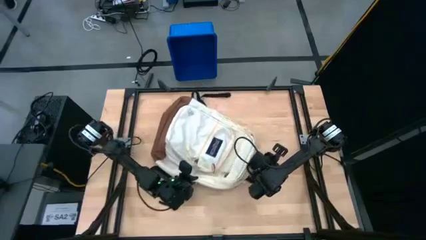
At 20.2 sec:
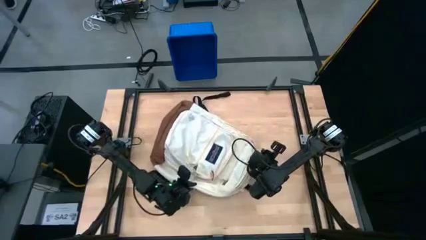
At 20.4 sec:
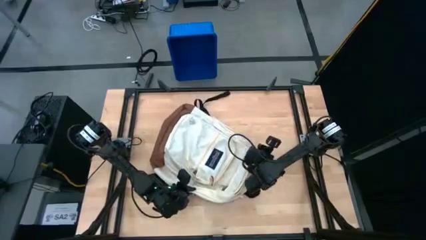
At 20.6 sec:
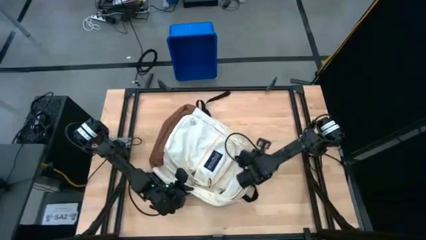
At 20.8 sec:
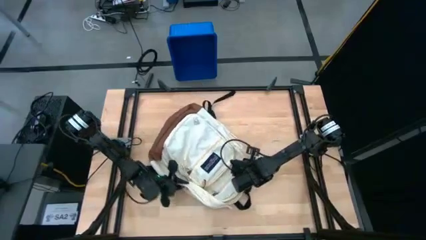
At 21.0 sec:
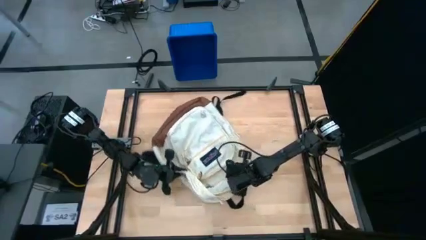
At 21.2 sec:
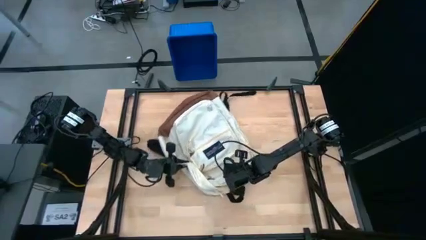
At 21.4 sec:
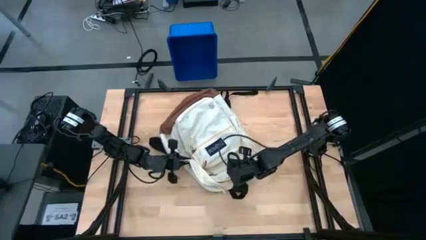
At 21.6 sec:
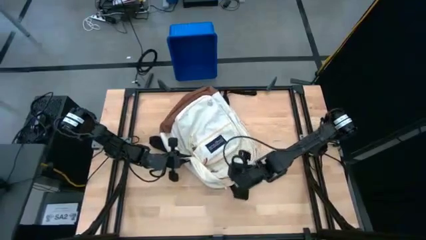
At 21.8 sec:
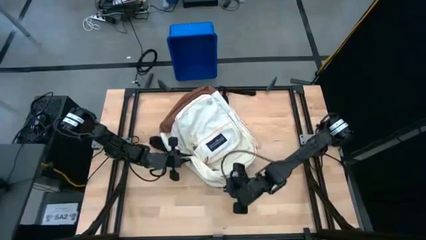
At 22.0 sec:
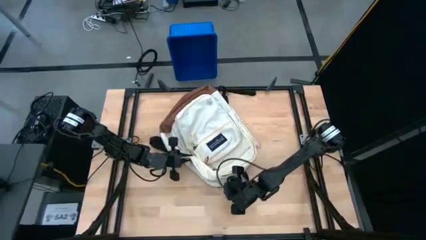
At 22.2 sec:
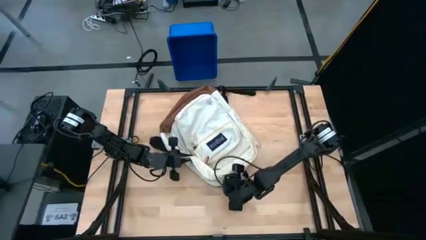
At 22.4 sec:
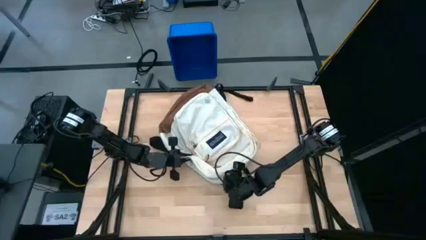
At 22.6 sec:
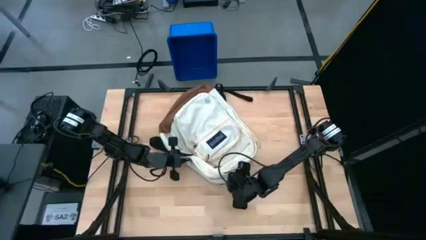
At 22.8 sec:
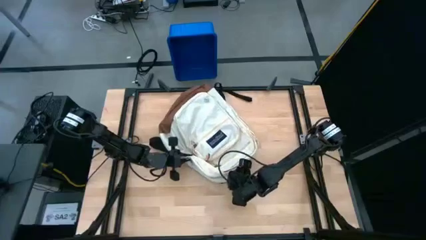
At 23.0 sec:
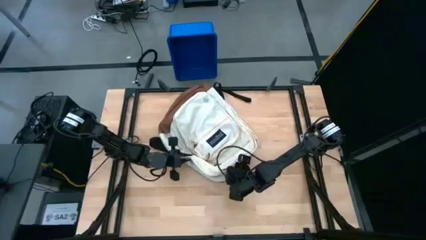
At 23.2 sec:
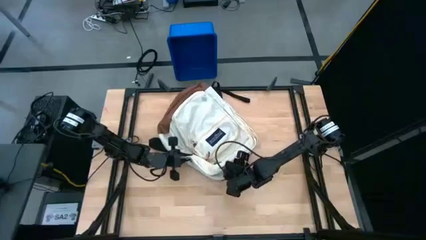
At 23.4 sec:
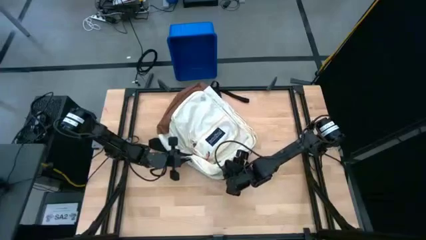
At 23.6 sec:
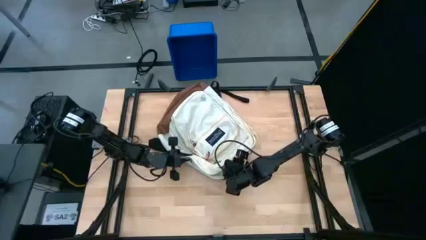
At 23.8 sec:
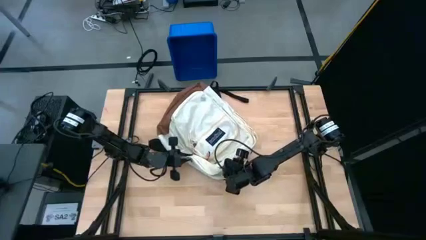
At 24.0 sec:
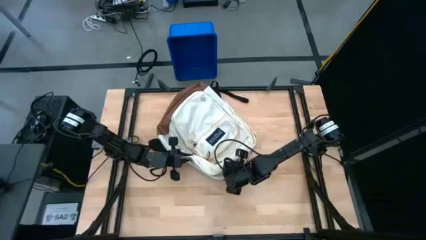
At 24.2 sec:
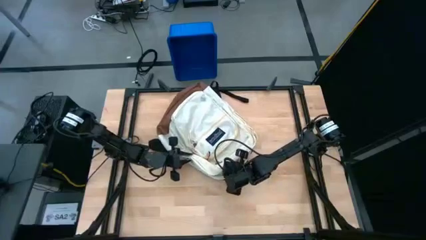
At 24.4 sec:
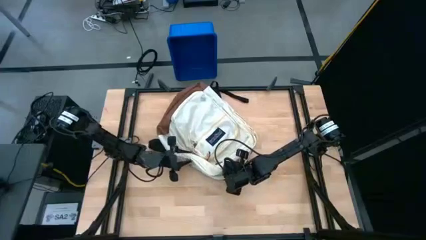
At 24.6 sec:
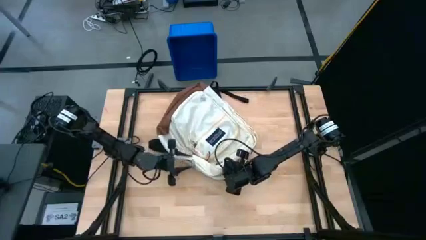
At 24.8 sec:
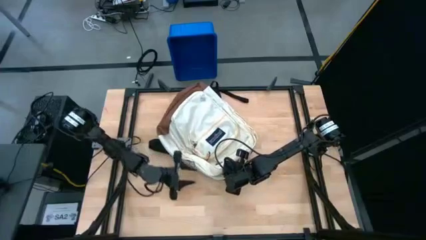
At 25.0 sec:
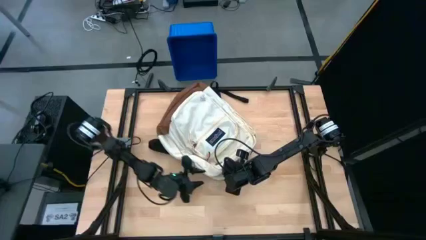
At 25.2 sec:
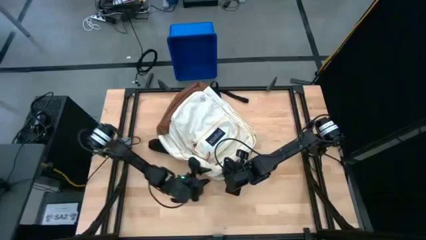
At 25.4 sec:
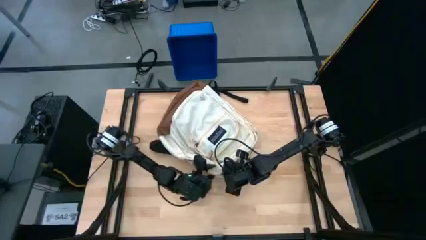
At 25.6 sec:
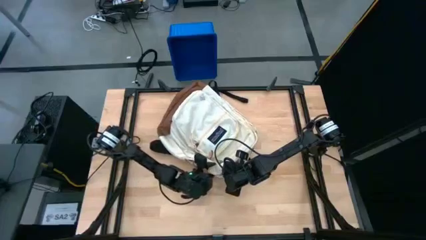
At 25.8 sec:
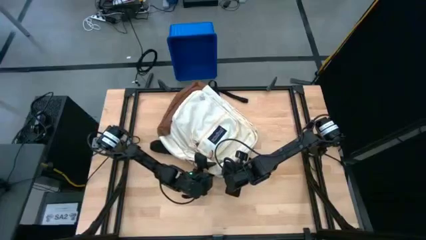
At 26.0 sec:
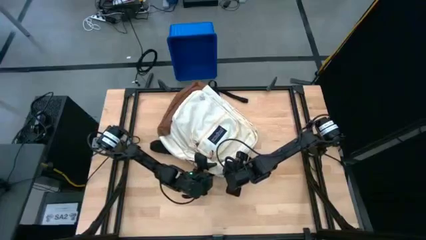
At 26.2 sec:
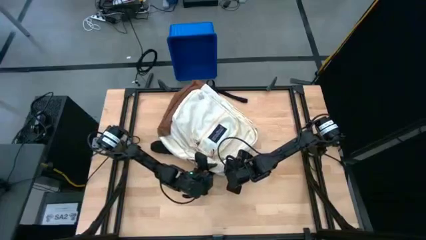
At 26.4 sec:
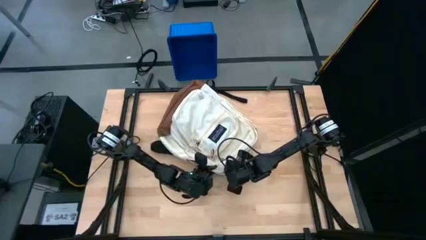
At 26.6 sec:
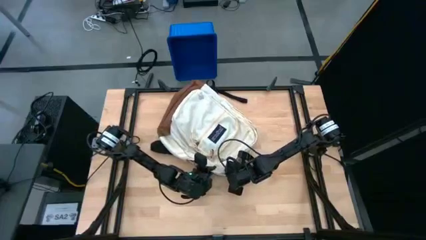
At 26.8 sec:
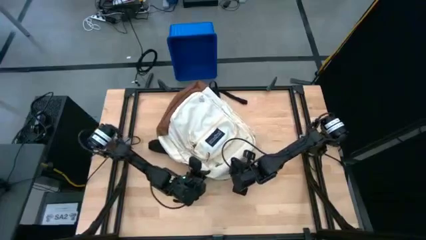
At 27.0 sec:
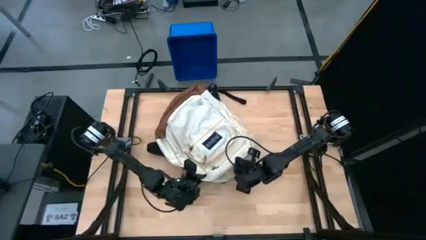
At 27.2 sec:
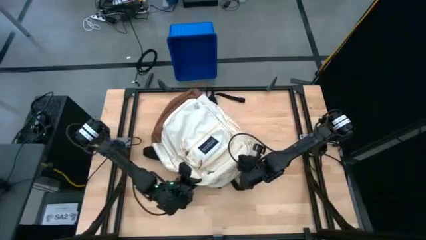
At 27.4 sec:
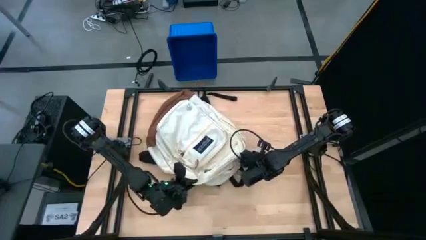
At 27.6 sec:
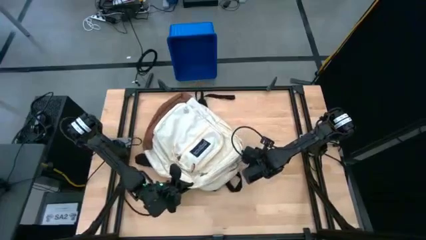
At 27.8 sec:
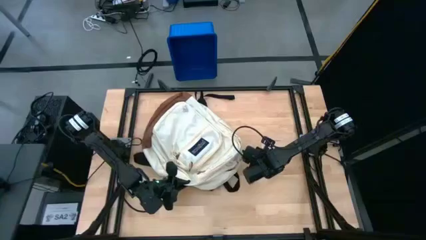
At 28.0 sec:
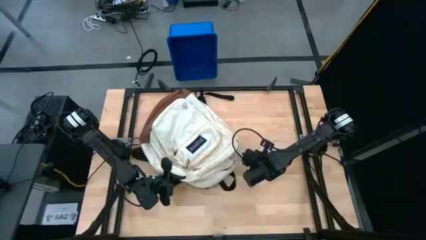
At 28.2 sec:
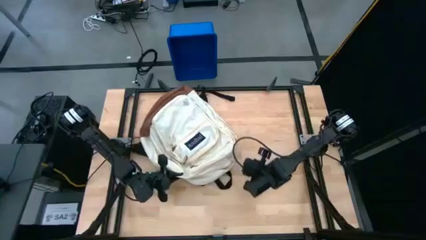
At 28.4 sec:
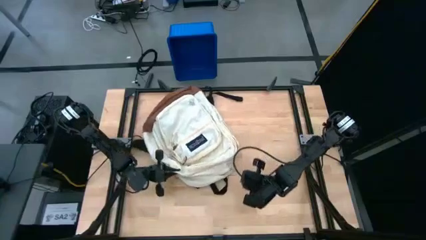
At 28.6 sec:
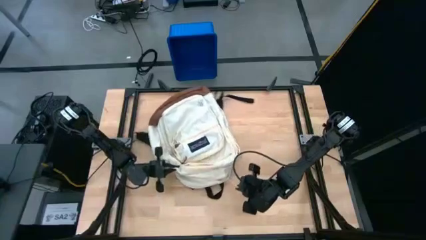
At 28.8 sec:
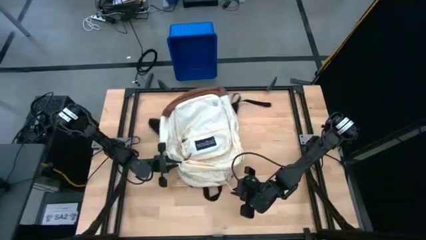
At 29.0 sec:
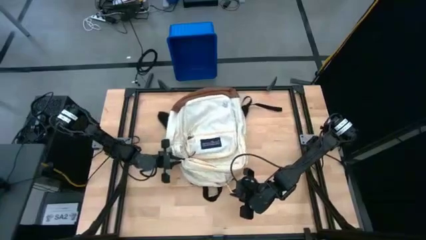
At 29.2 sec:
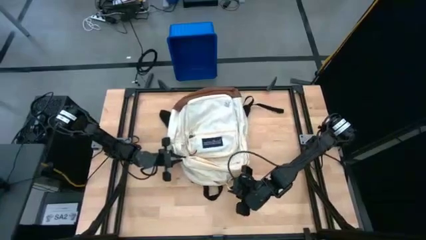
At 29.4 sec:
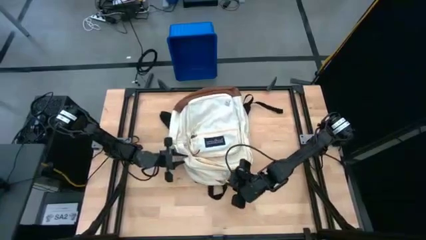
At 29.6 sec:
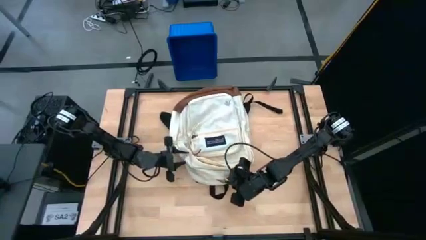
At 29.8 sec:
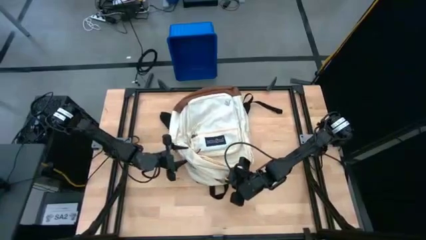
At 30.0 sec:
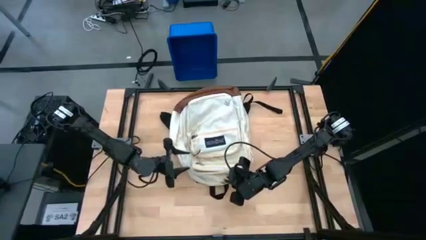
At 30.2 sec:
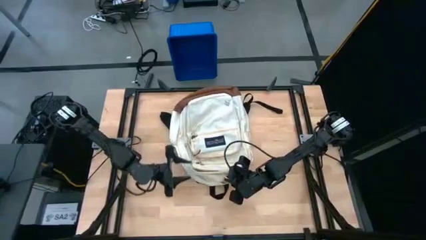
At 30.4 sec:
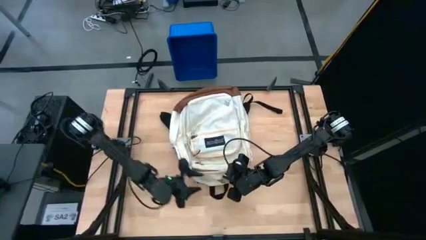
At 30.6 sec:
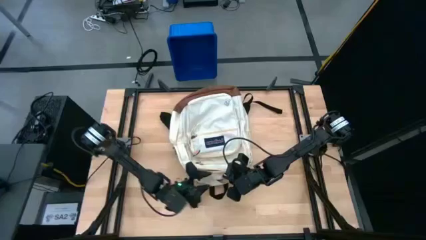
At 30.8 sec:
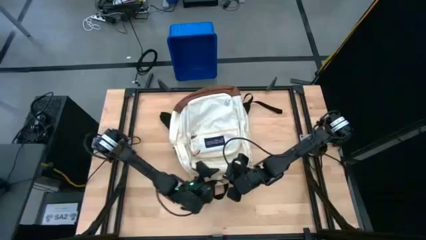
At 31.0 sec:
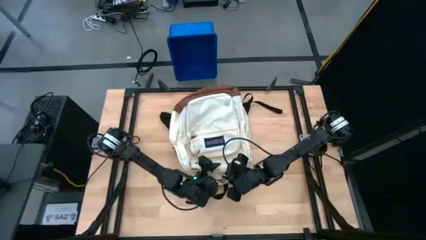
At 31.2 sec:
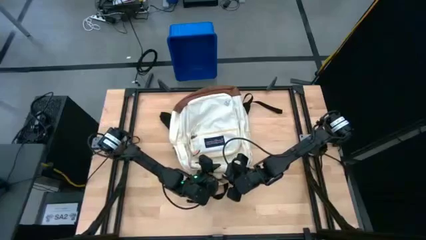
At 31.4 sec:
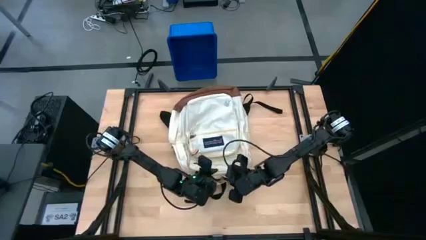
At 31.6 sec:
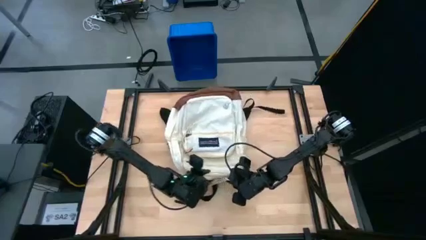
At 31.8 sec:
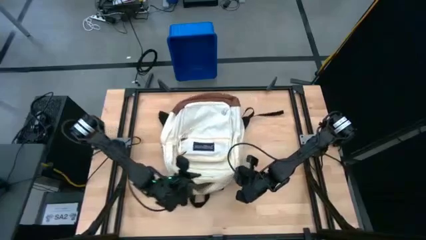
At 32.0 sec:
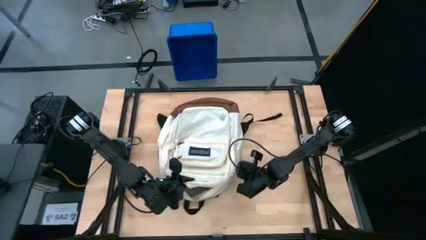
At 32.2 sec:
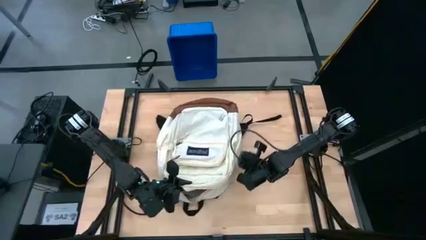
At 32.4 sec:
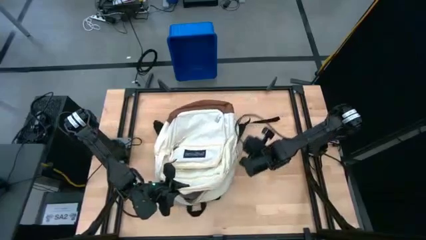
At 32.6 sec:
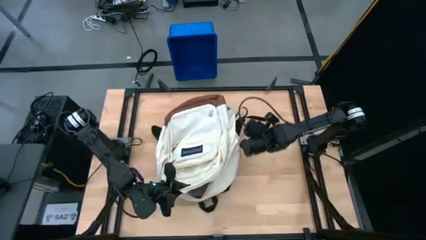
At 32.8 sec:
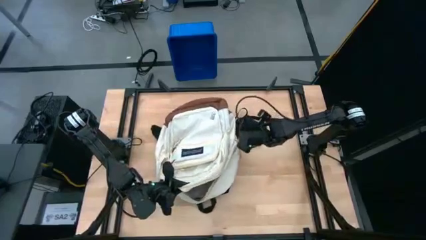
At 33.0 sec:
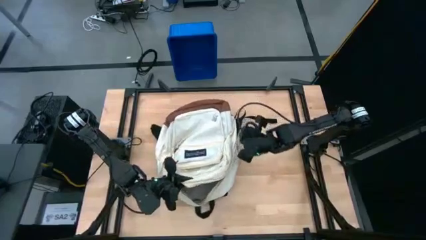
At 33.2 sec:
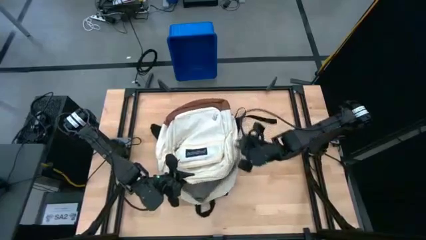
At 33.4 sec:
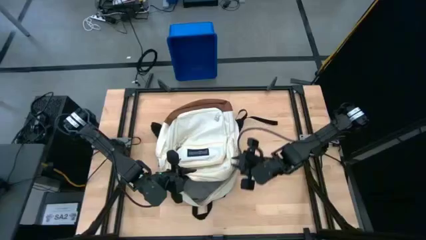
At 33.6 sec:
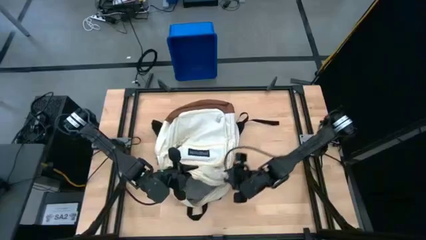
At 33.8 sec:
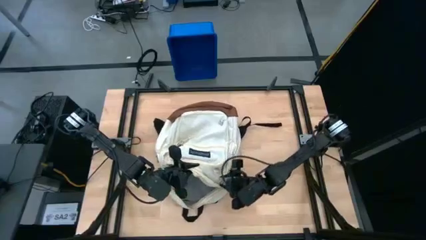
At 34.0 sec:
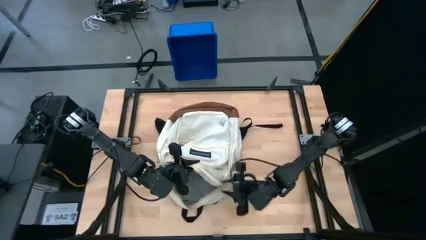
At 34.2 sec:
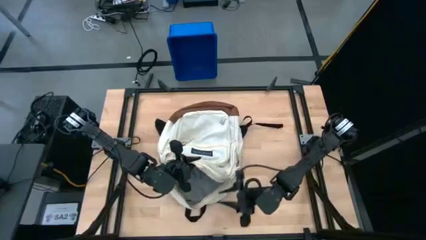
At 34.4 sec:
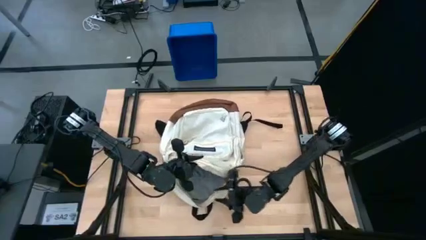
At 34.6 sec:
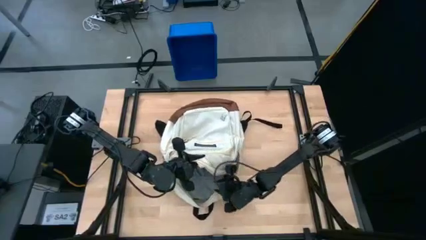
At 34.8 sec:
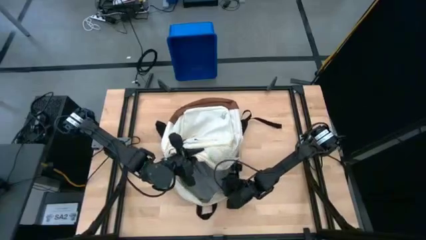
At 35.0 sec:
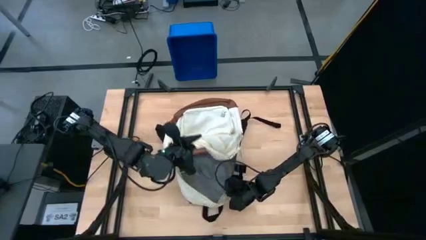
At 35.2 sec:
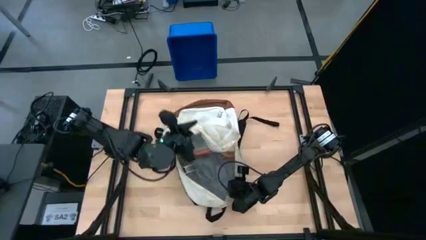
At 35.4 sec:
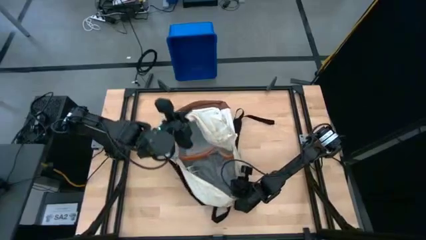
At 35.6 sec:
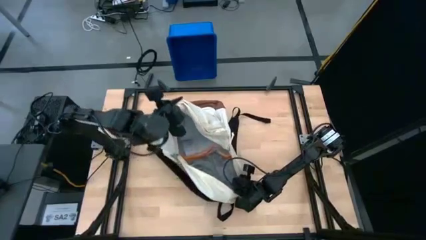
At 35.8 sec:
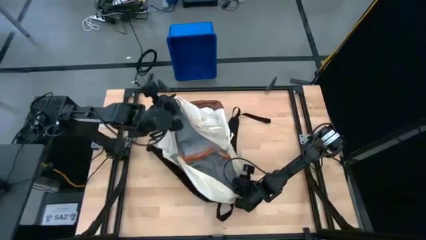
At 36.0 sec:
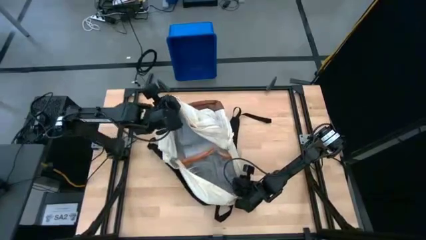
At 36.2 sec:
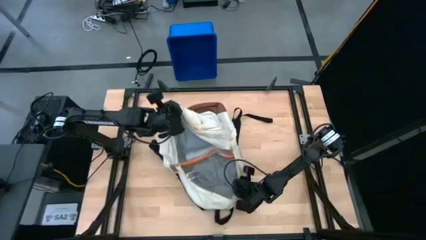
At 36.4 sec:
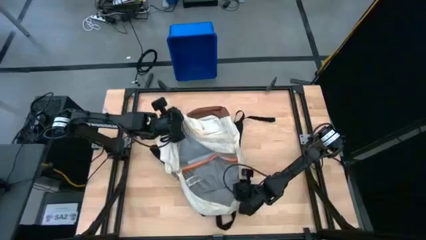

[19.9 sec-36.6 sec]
Task: Unpack backpack
Open the white backpack
